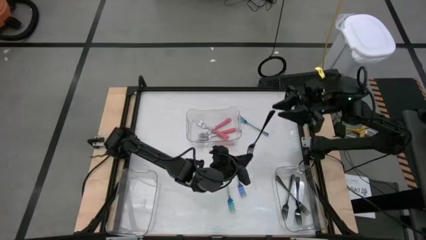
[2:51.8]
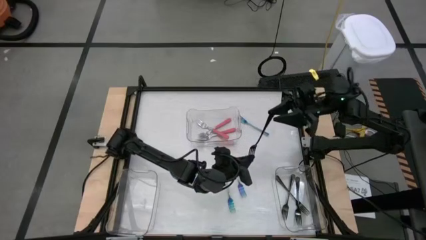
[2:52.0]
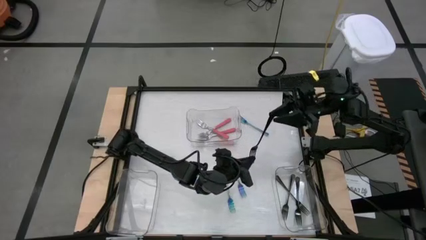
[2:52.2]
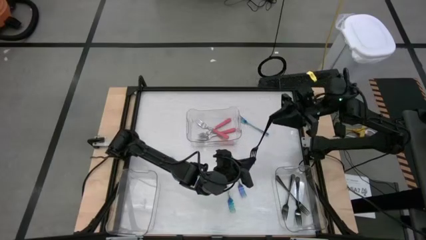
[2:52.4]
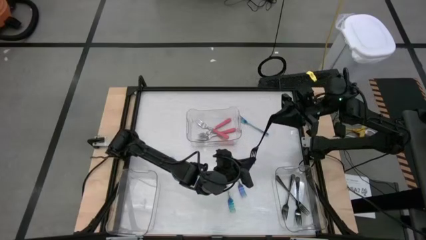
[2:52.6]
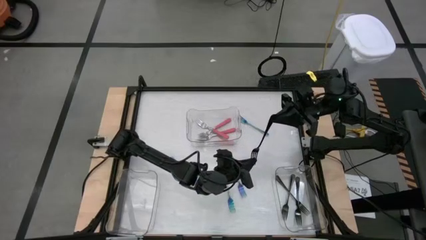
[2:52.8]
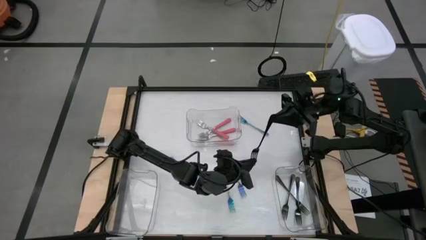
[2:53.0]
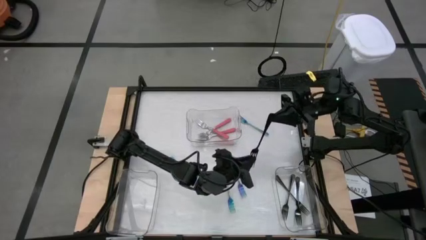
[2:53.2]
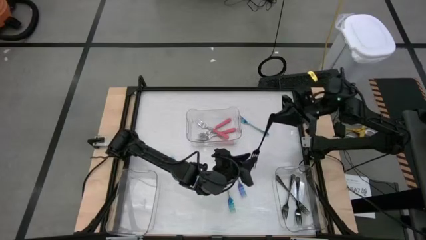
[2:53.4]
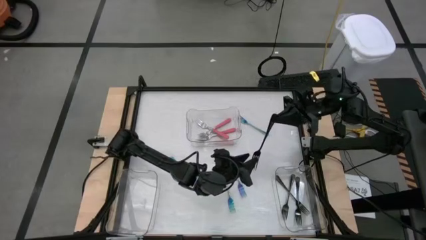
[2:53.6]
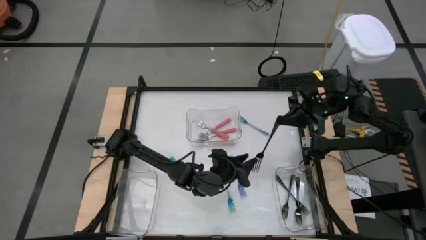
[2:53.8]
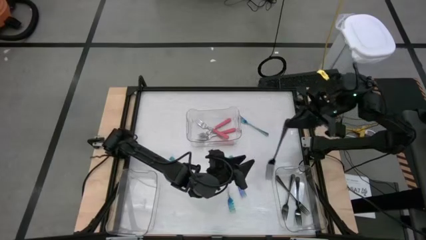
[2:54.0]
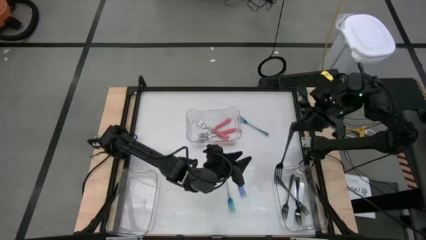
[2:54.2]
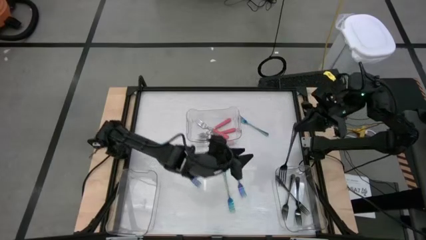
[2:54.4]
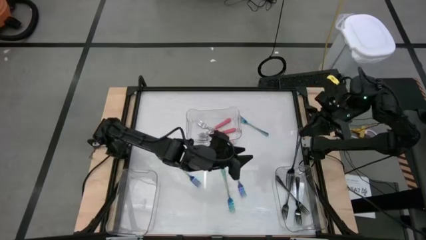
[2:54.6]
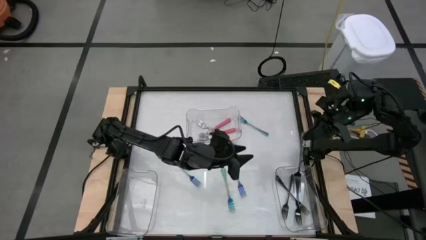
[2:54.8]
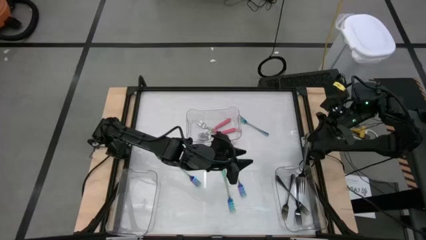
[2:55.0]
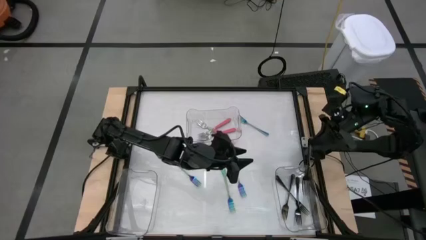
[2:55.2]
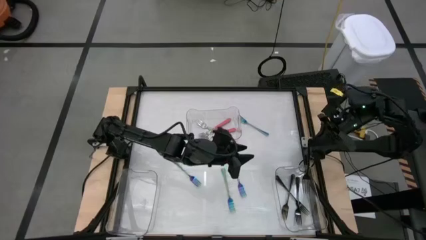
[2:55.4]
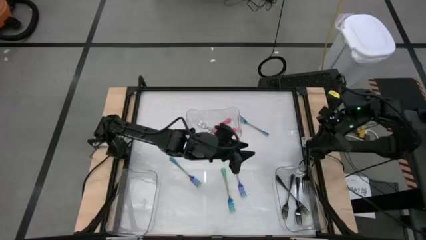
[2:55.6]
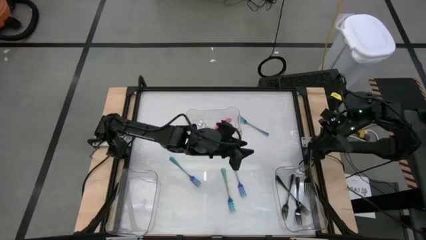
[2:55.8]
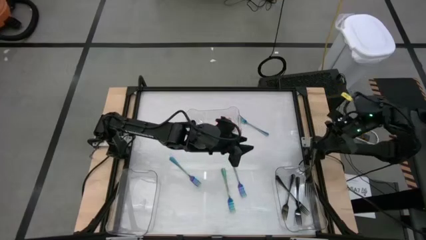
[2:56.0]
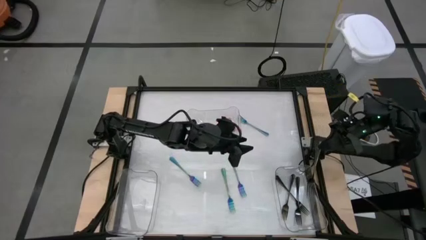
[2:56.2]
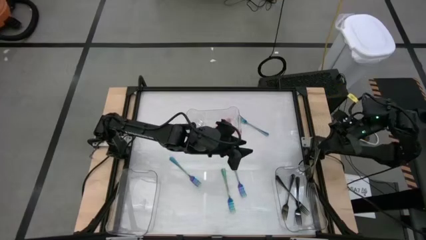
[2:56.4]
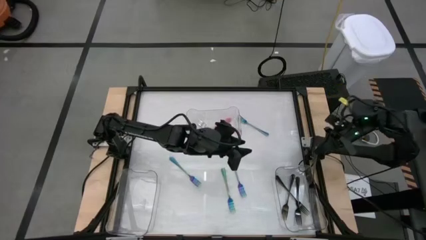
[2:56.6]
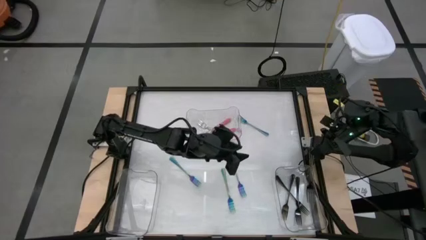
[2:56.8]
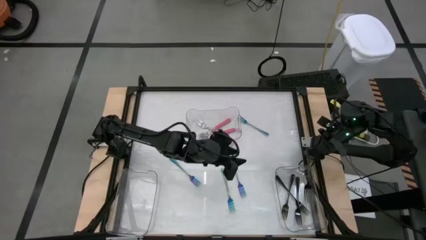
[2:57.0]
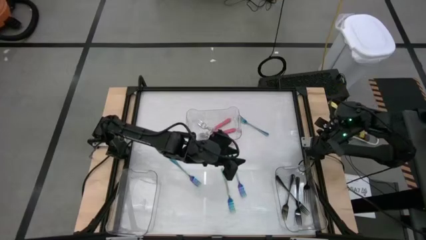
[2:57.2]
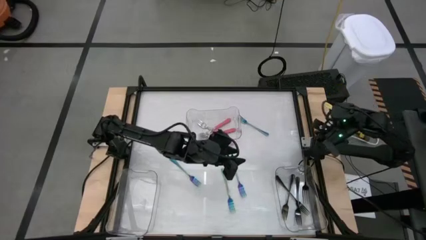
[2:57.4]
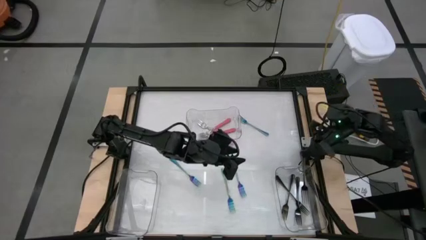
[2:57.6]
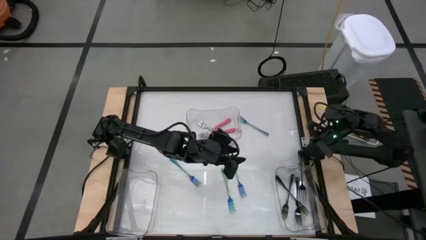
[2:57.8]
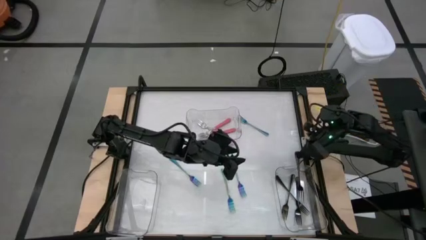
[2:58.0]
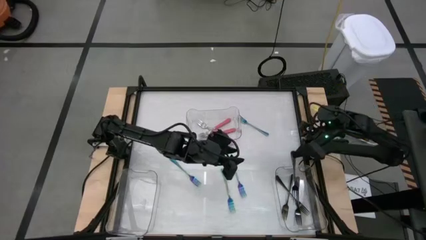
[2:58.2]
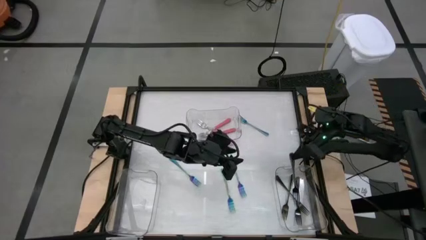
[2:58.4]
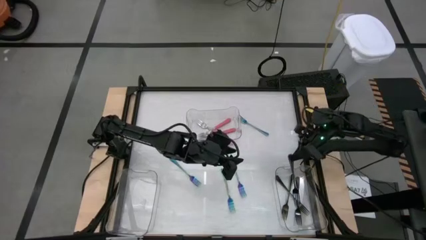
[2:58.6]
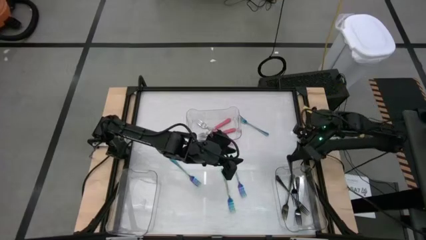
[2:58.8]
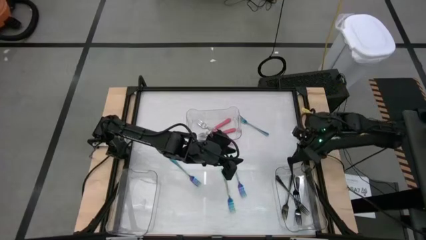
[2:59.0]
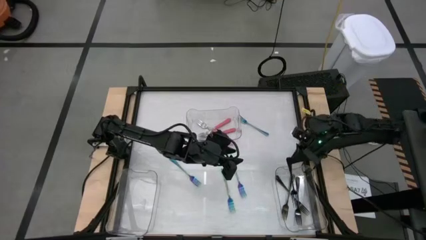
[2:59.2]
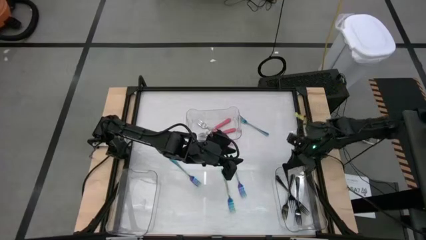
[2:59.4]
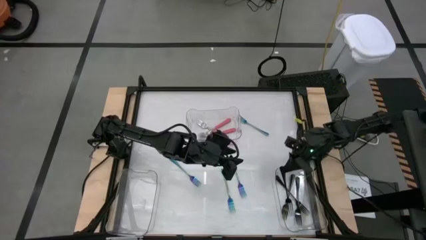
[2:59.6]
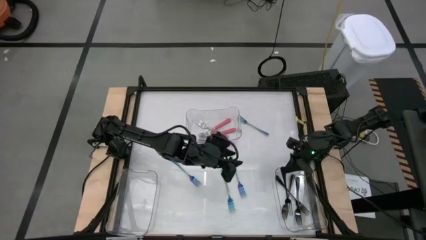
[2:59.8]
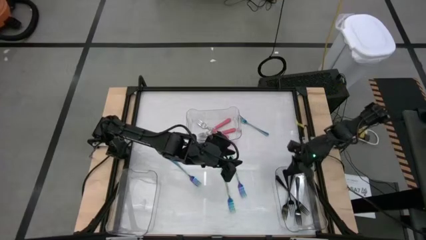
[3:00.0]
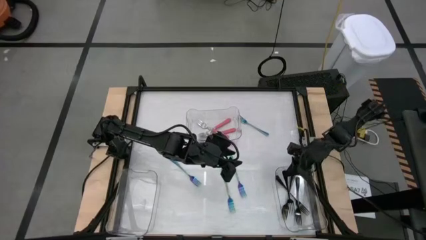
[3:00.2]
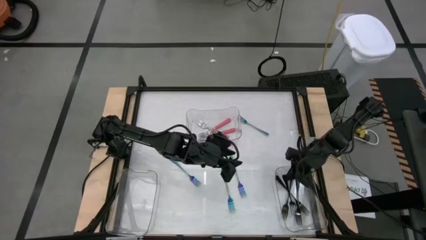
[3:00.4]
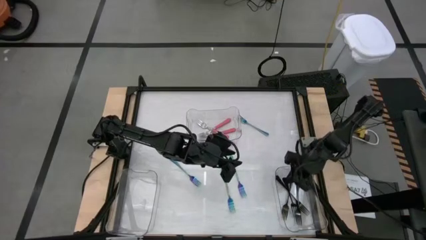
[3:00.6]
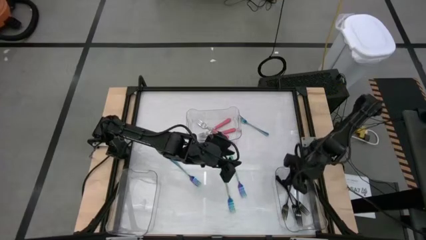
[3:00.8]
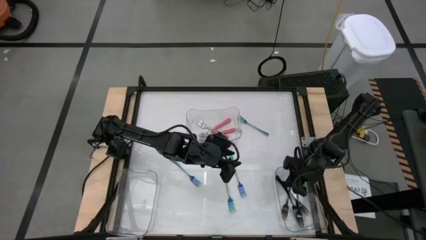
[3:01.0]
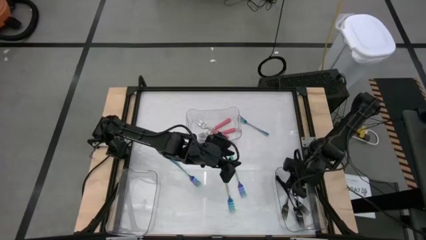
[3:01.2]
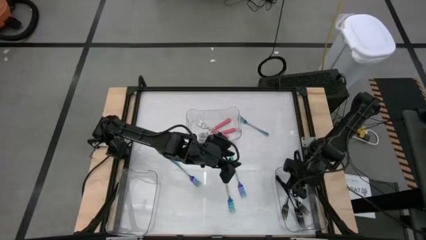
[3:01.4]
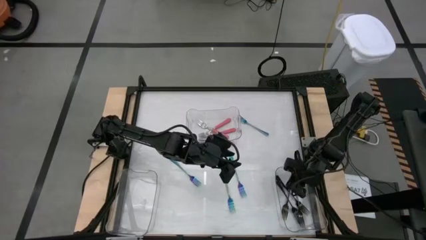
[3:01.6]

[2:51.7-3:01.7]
Task: Sort silverware by color (type)
Put the black fork into the right transparent bin
